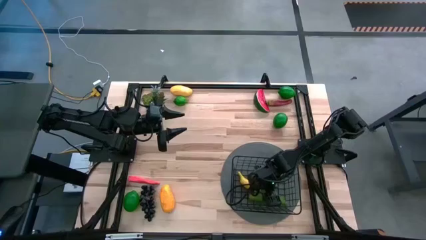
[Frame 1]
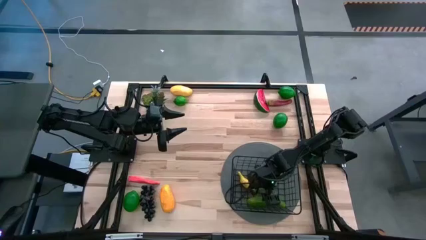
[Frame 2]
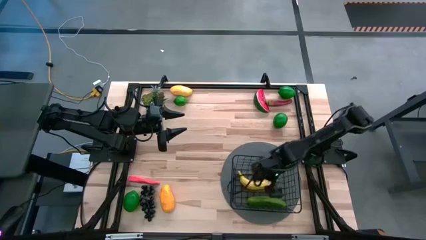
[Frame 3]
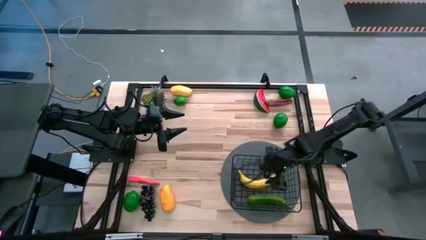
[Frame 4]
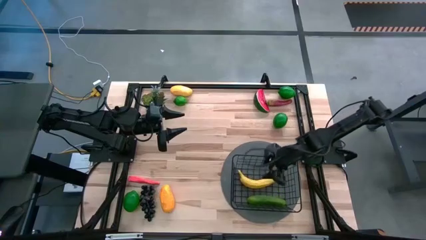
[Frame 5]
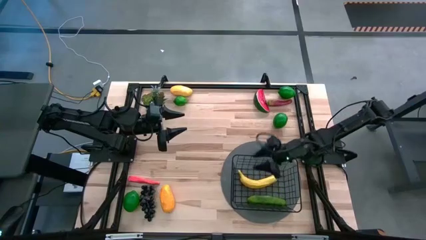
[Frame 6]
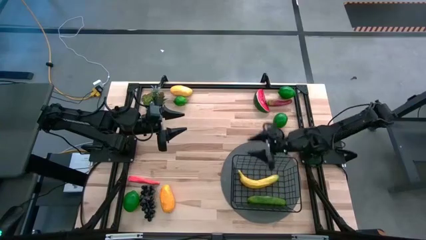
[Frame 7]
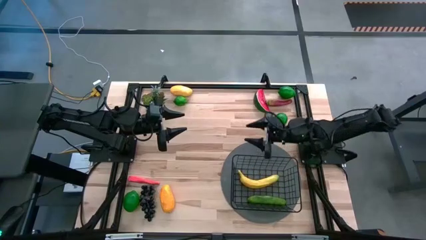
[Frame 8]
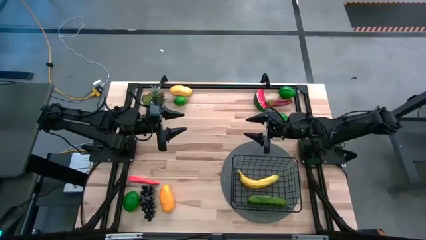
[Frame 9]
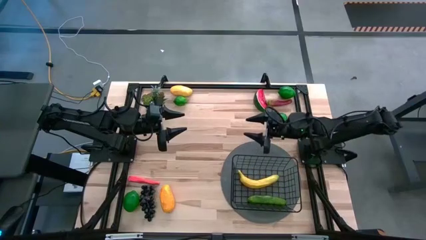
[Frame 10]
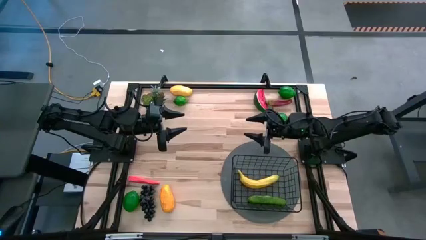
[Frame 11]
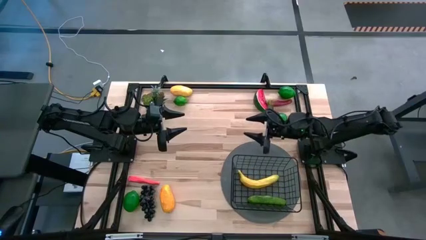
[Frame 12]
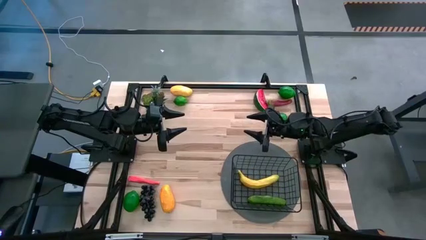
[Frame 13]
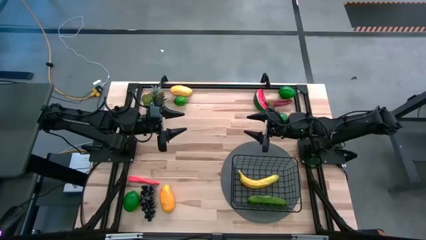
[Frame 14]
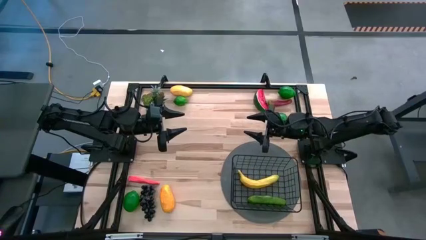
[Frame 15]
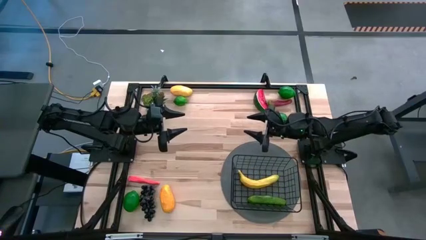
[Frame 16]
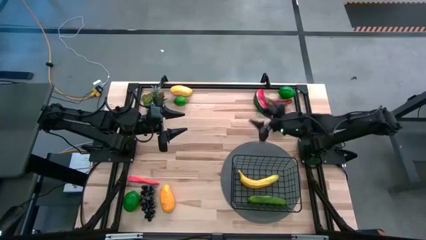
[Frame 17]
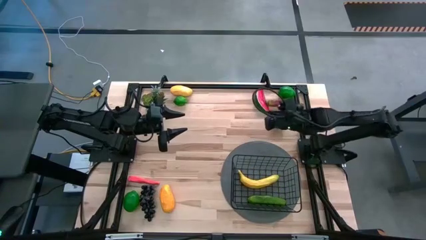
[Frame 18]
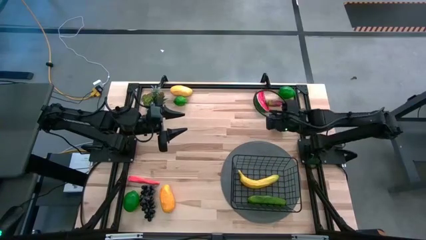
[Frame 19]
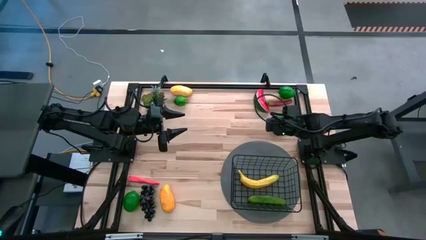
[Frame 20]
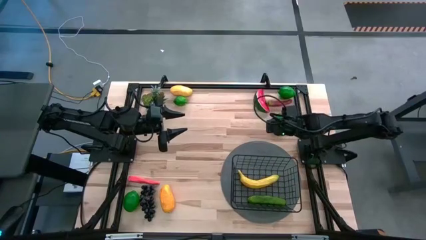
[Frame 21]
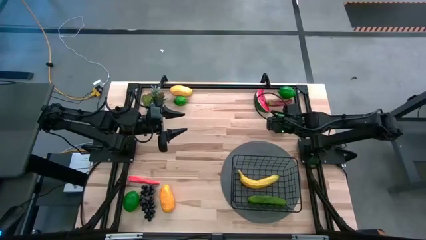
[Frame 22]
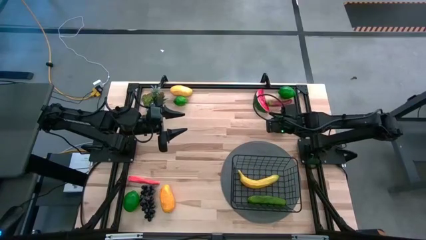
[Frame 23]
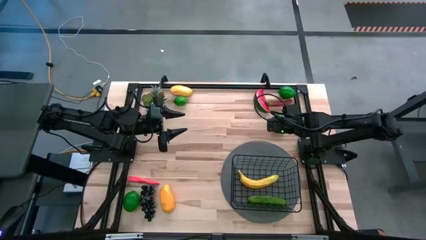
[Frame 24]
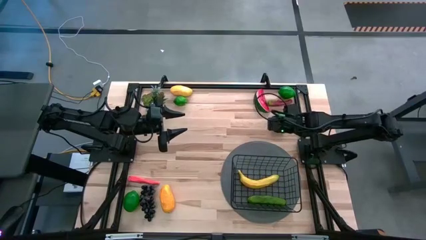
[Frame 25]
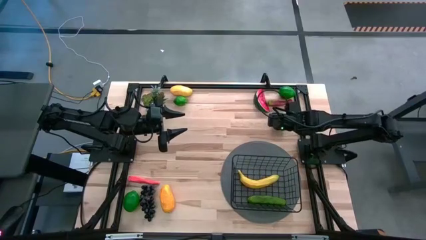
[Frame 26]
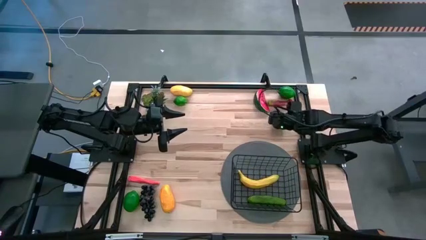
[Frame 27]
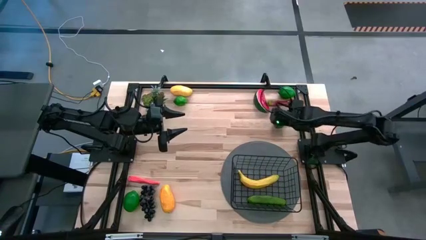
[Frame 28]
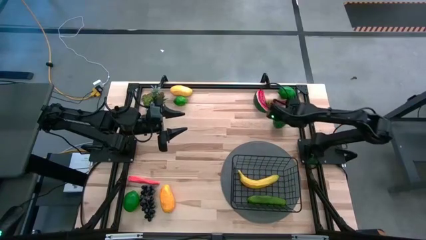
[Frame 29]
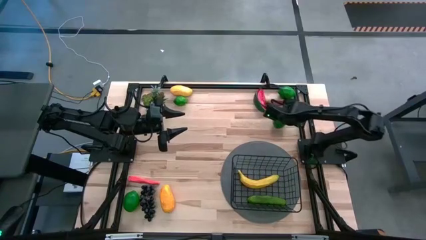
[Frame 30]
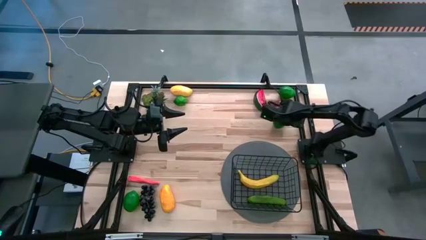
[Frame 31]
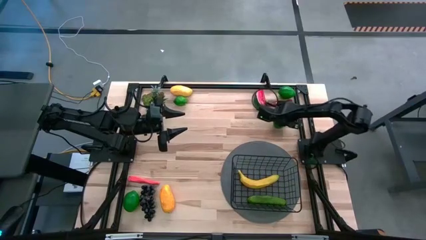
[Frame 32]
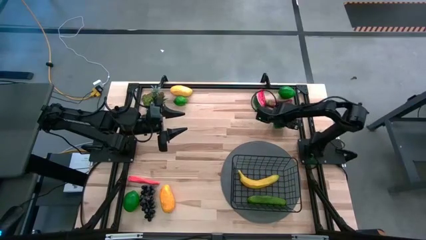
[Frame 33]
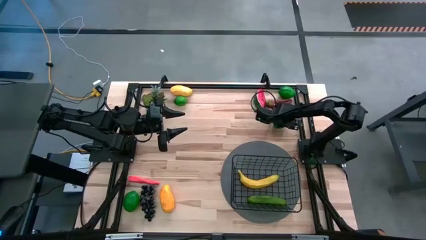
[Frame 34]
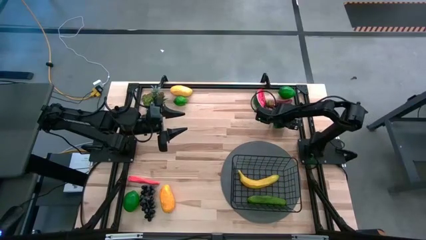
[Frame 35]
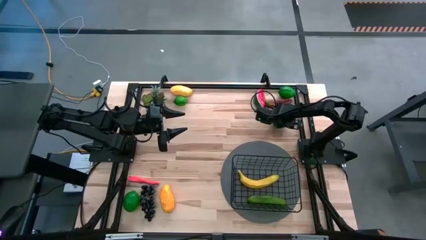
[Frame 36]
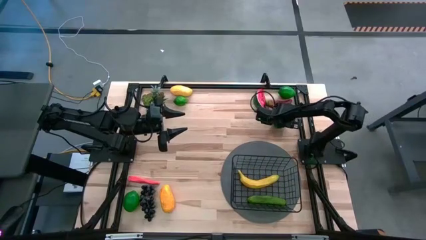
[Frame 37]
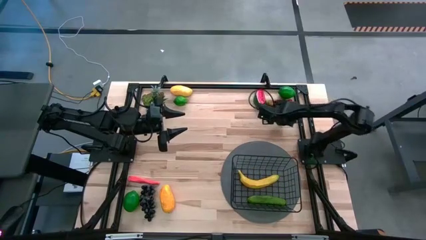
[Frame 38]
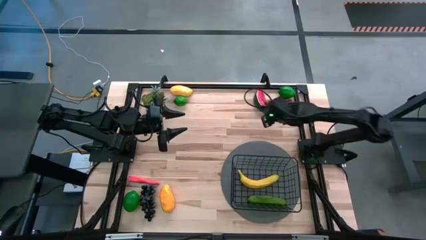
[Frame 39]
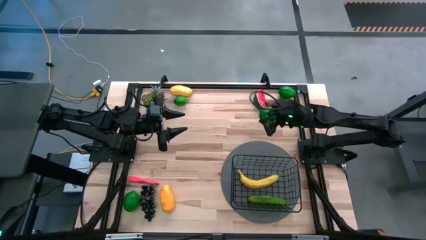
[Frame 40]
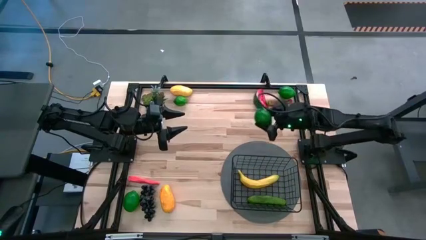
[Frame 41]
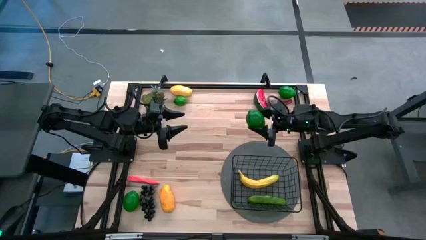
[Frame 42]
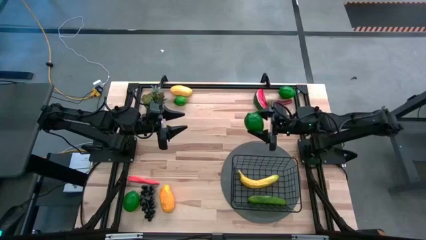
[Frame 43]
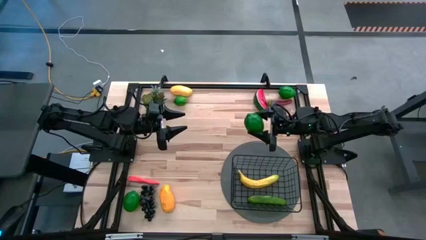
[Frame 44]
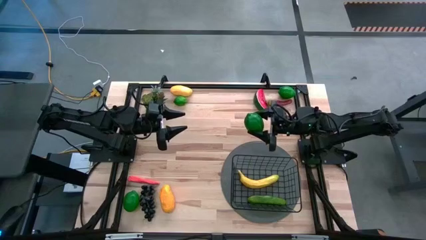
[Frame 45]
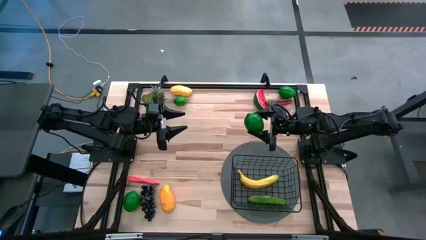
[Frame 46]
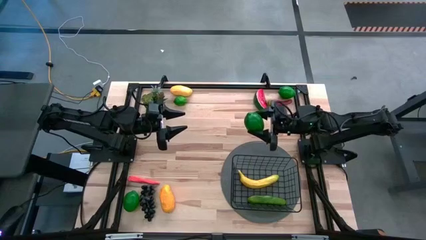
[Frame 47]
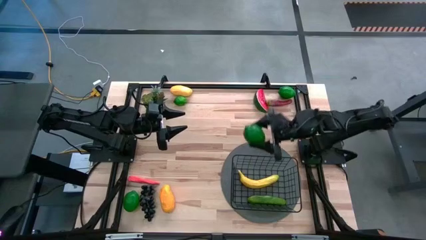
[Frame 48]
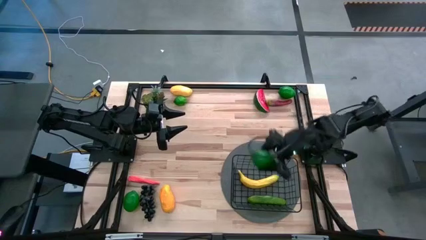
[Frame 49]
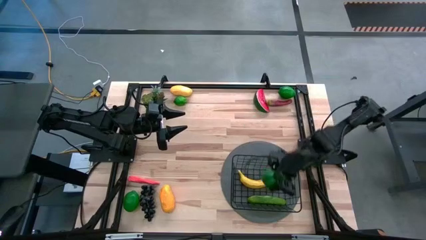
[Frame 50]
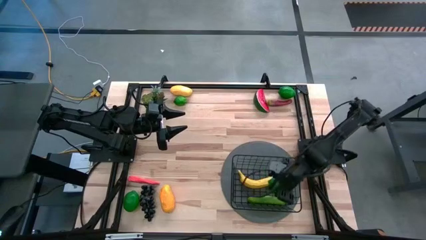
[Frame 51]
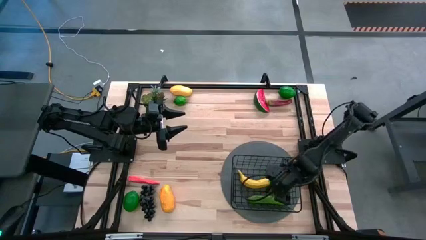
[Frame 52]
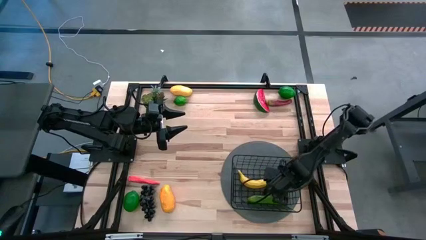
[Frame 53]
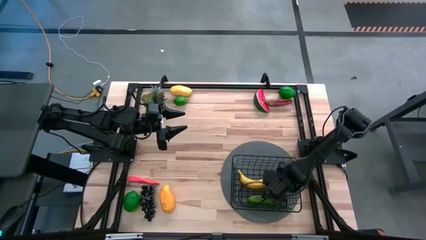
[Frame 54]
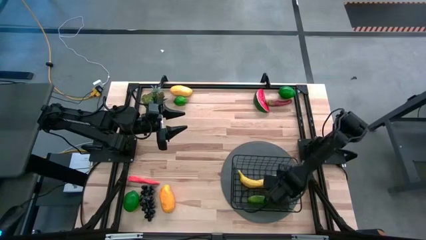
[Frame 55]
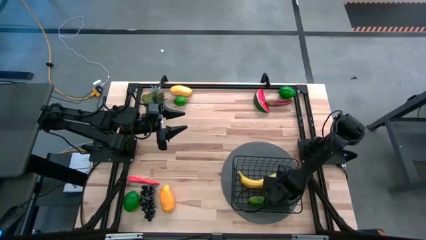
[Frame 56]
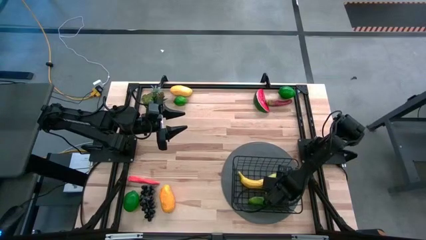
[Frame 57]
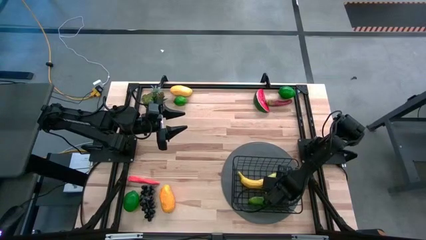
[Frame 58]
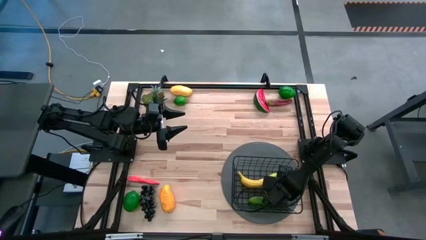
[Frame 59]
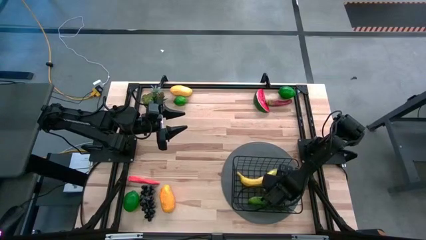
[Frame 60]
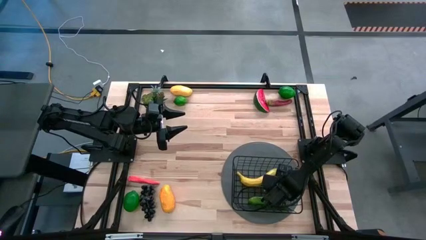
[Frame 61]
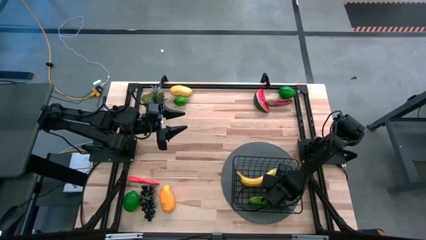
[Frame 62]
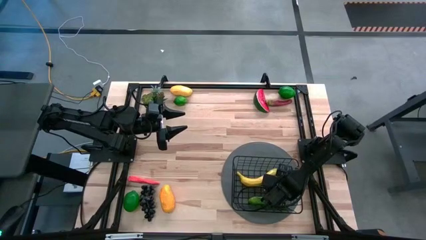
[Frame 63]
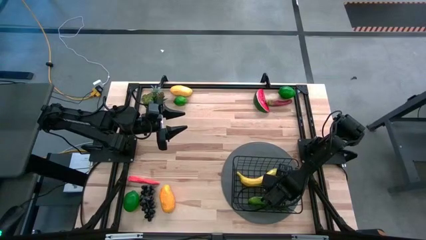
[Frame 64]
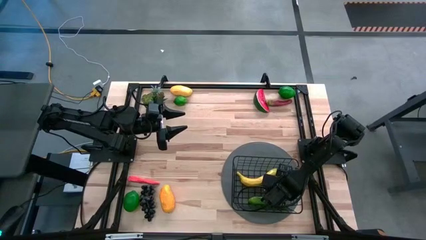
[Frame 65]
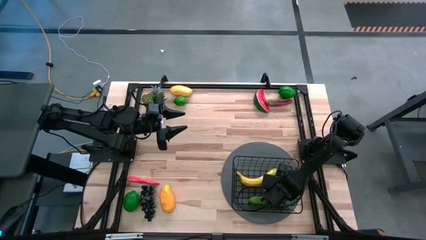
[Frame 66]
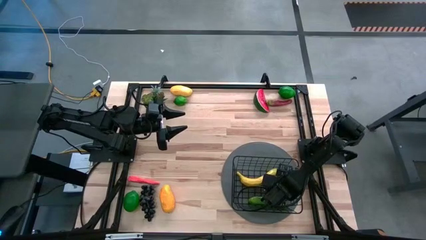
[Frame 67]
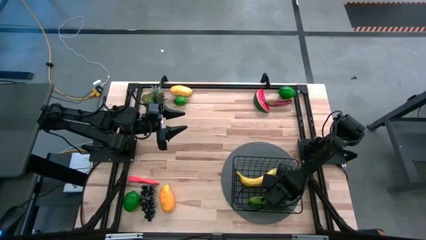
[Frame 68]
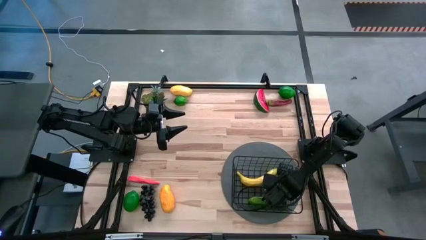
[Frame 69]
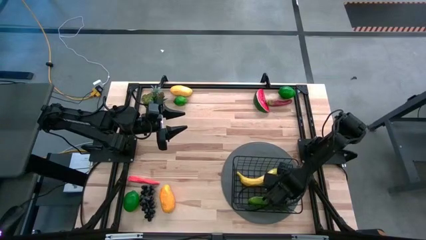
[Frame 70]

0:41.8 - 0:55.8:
Task: Build produce basket
Put the green lime into the black basket

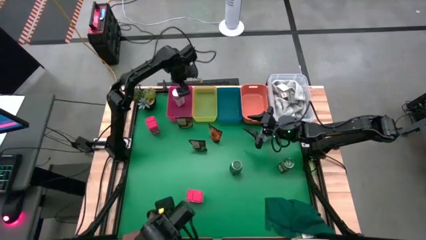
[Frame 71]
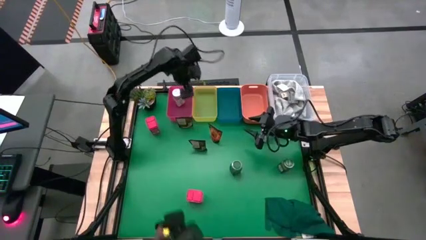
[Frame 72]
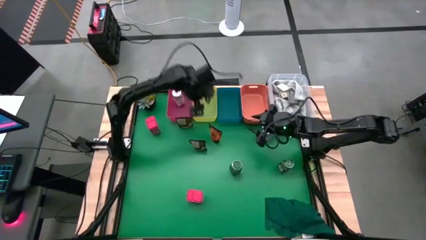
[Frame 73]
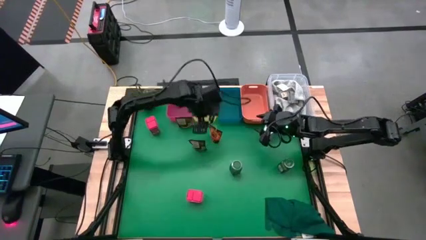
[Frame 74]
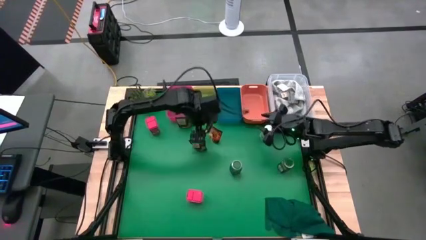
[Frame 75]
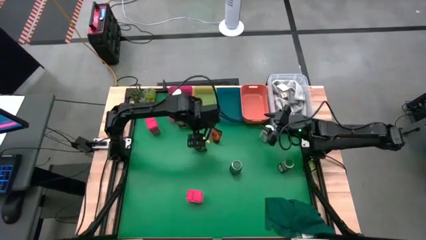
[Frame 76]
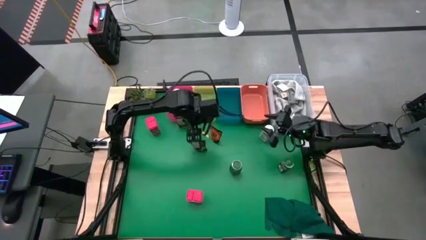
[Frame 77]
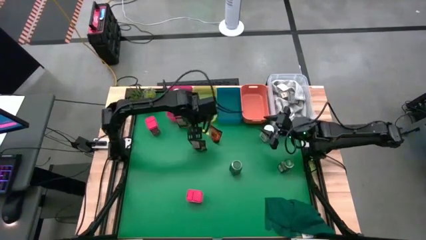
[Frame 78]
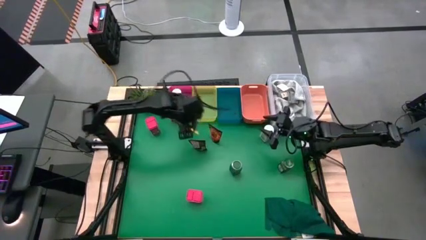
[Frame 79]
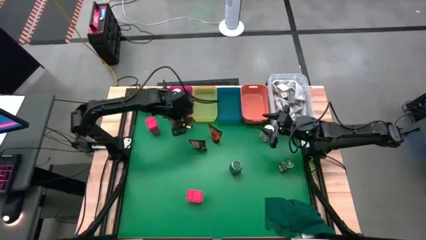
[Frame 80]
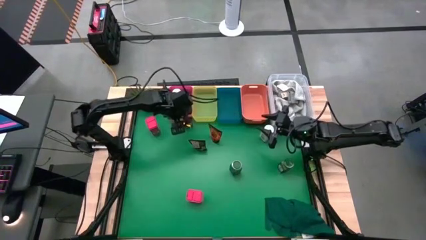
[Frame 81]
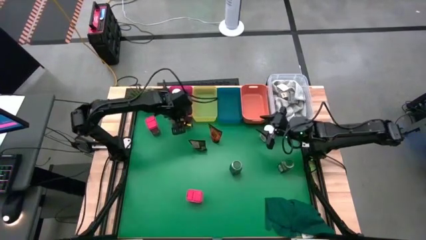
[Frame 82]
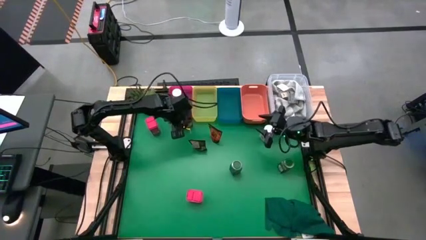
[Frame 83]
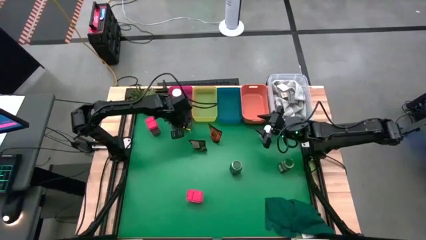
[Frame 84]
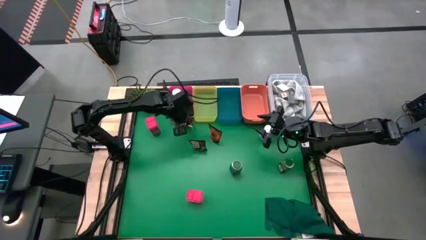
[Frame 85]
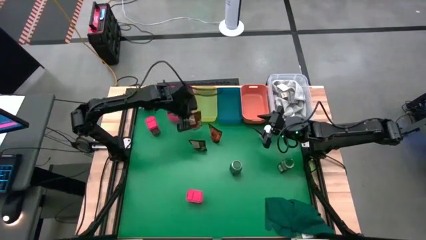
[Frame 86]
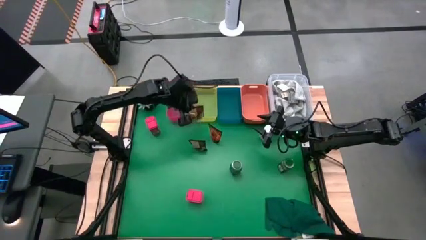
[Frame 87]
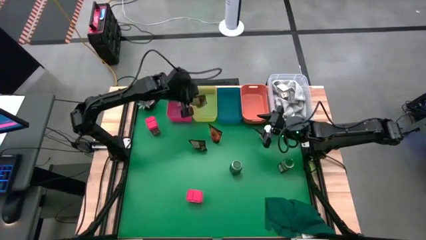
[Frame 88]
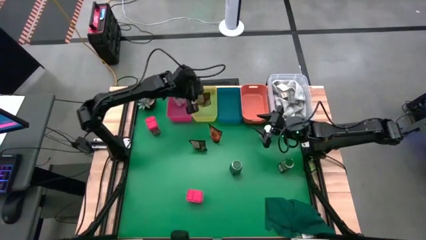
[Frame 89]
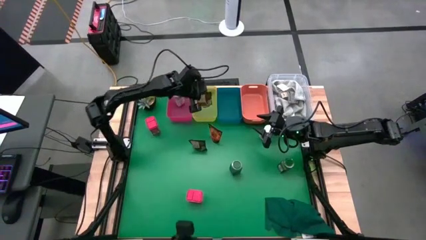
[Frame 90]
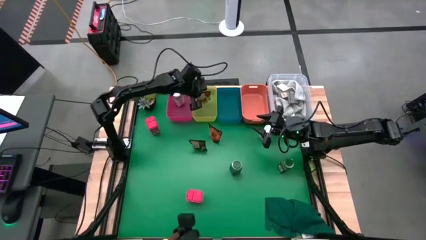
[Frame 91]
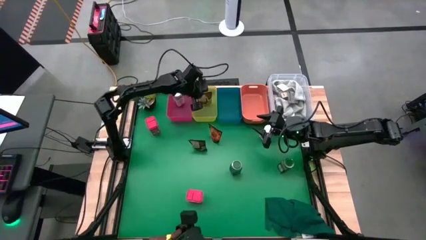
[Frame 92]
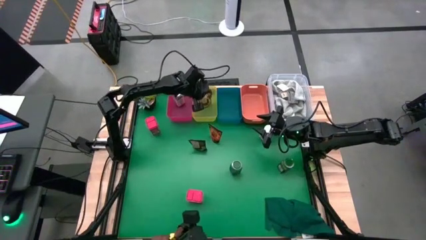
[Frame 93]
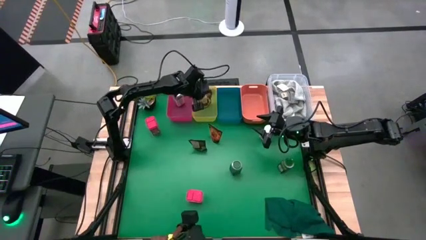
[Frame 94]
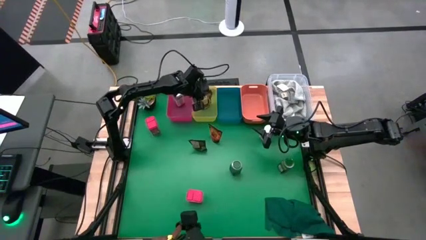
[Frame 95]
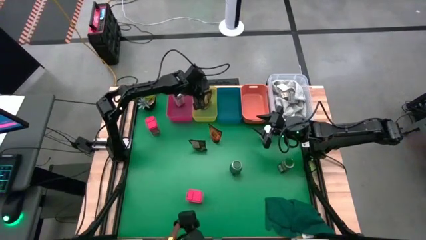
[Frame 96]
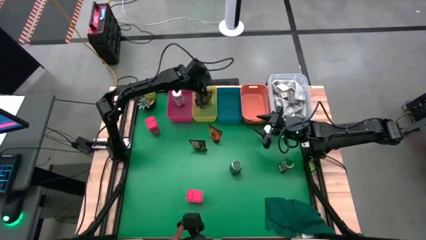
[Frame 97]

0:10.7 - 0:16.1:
Task: Sort spices by type
Put the top brown seasoning pack into the yellow bin
